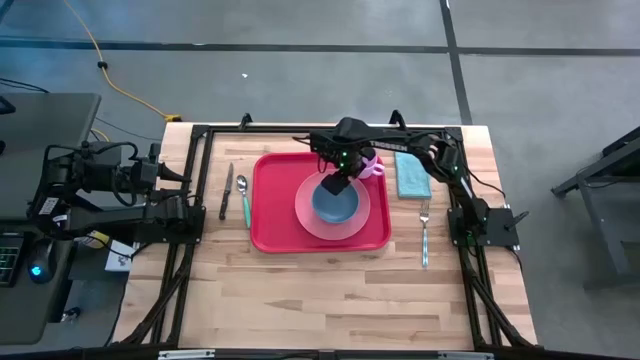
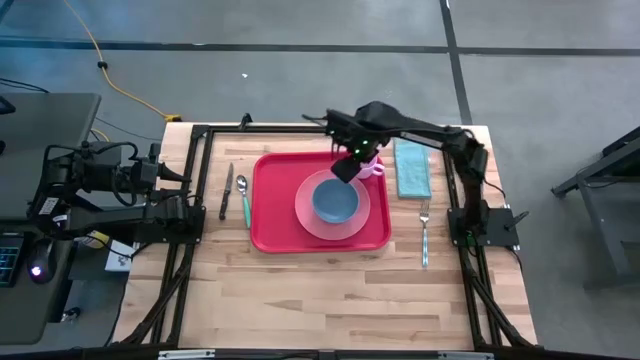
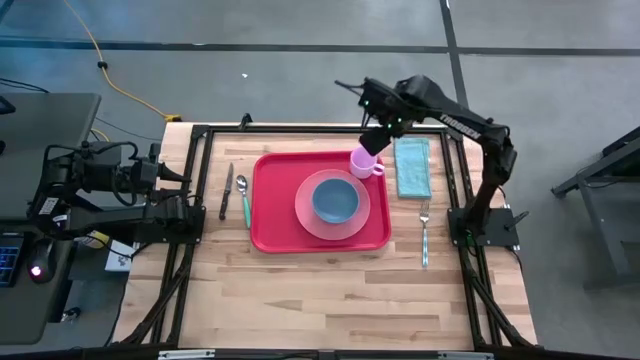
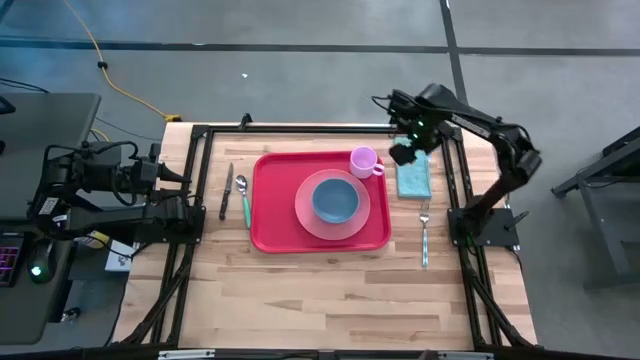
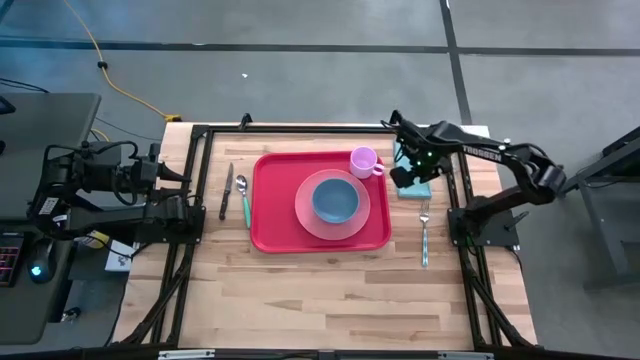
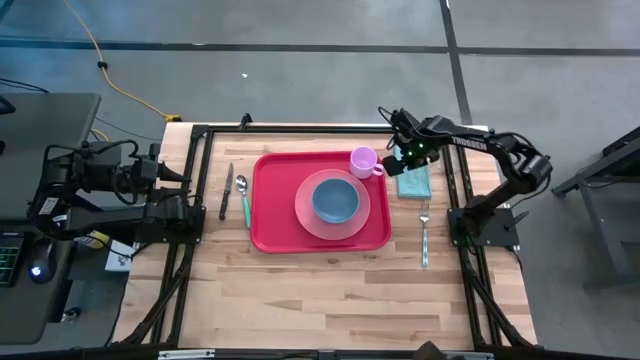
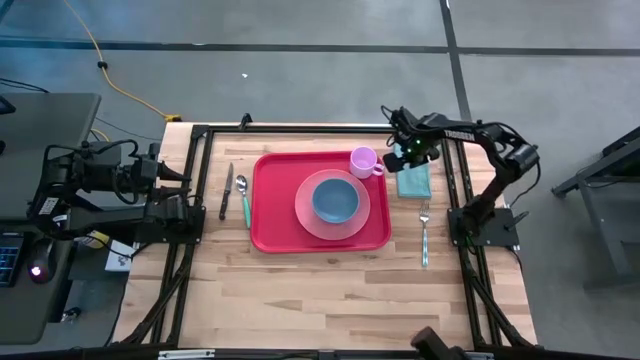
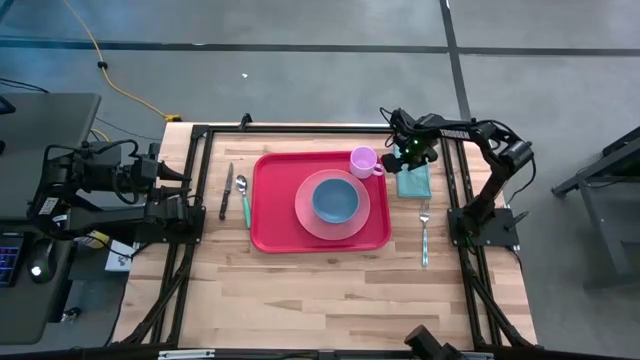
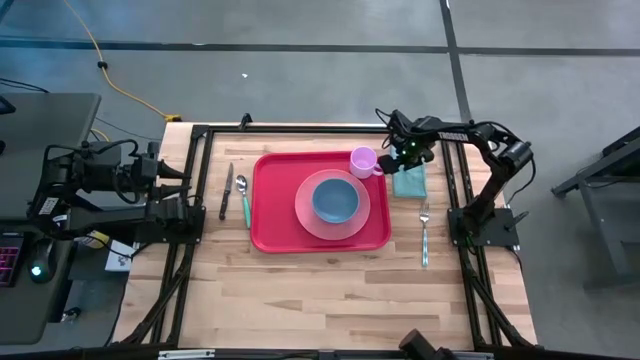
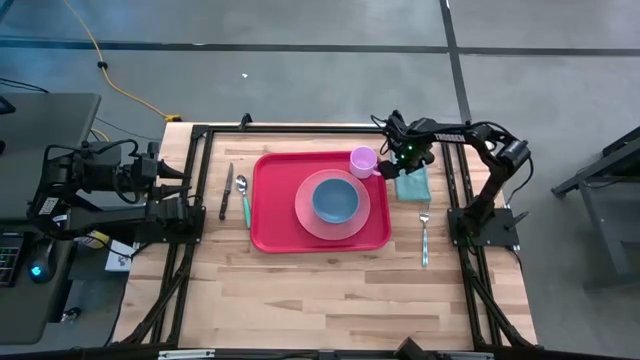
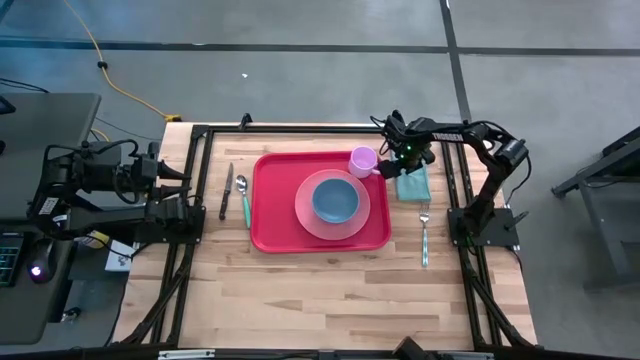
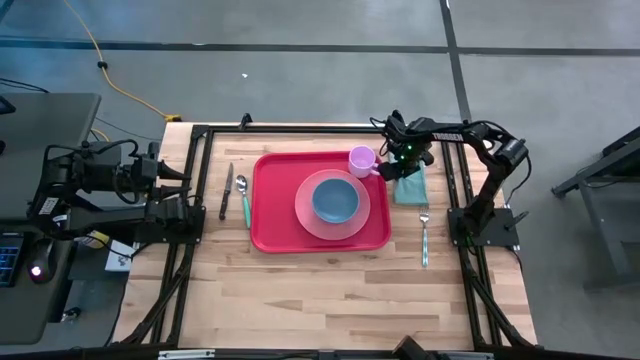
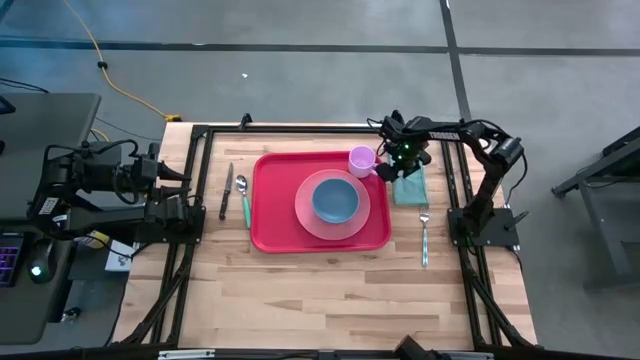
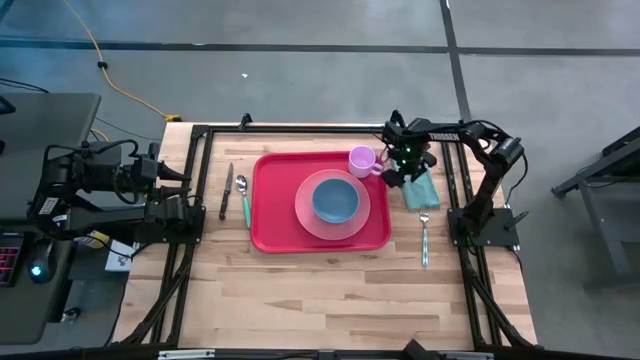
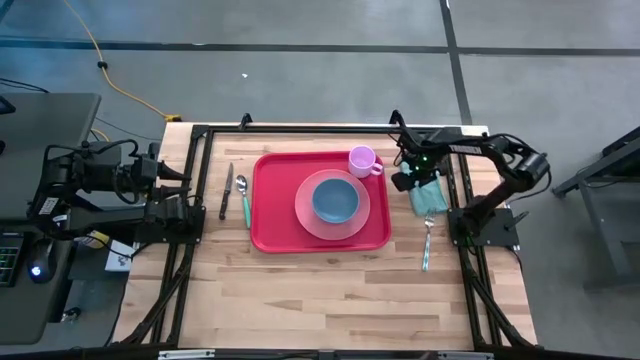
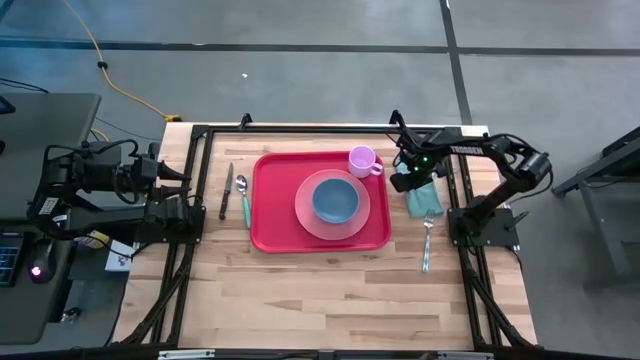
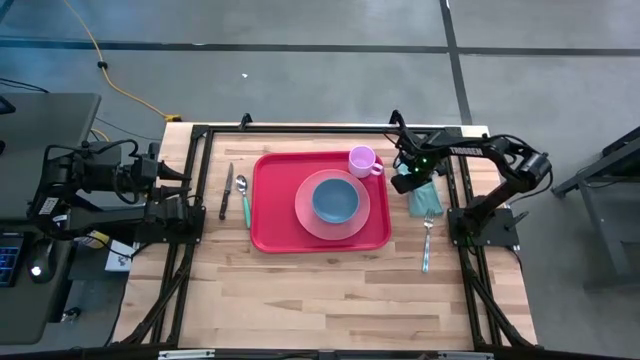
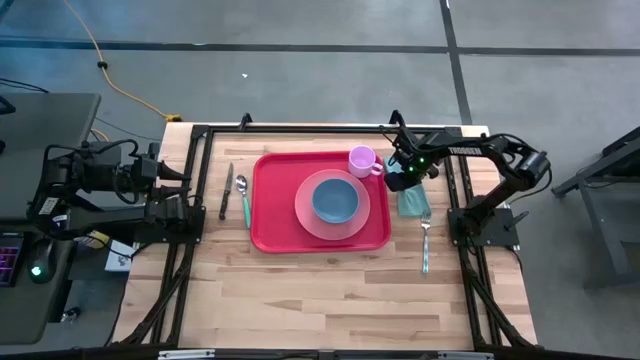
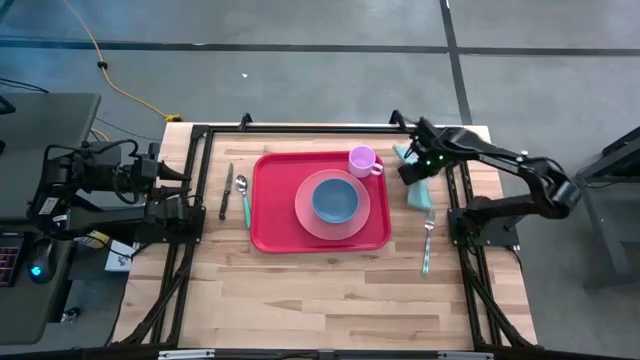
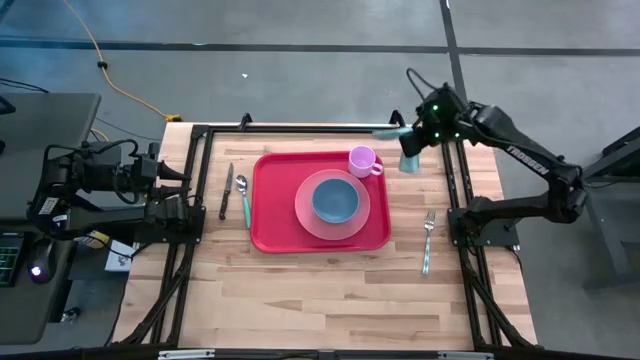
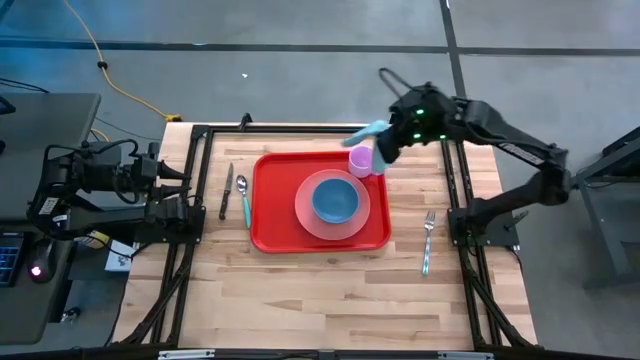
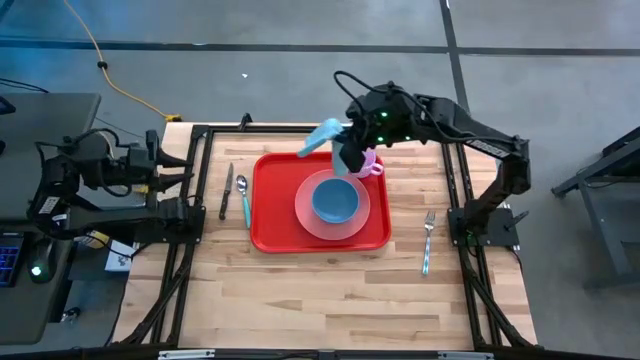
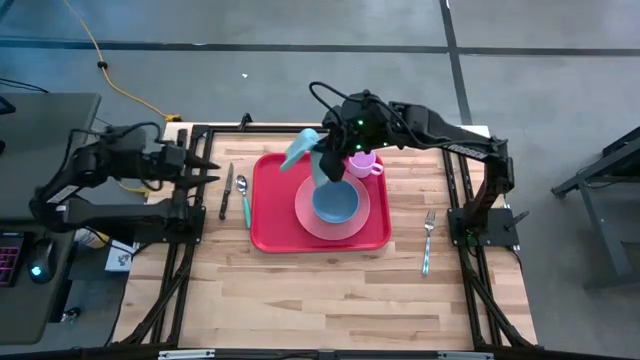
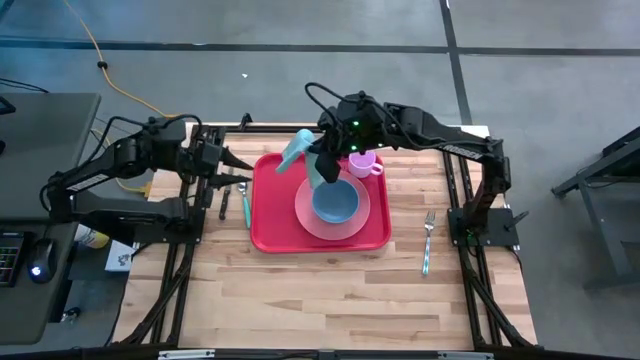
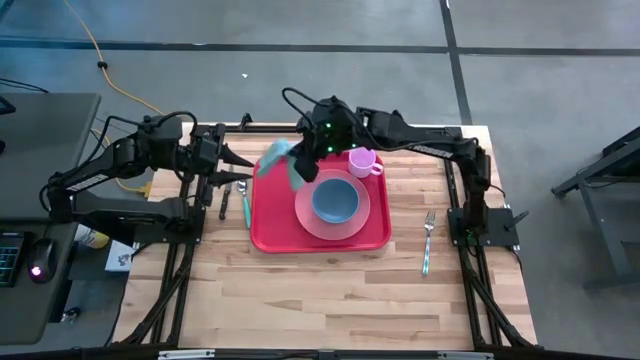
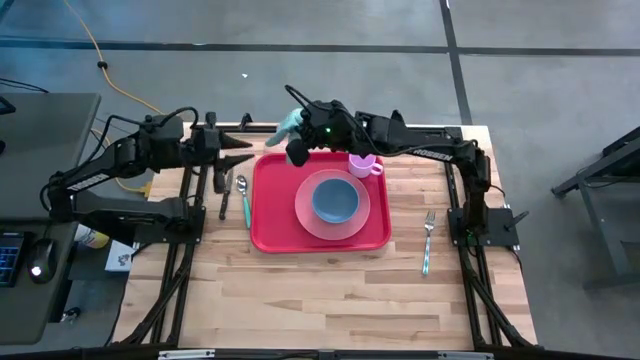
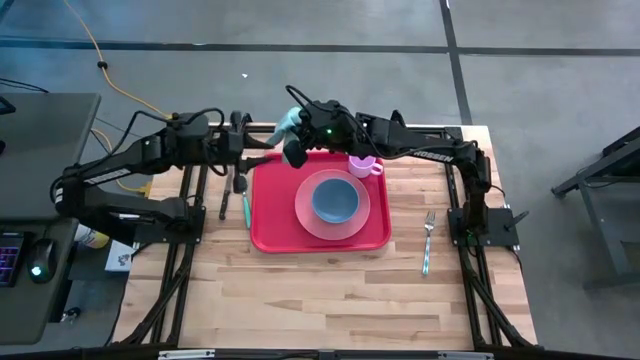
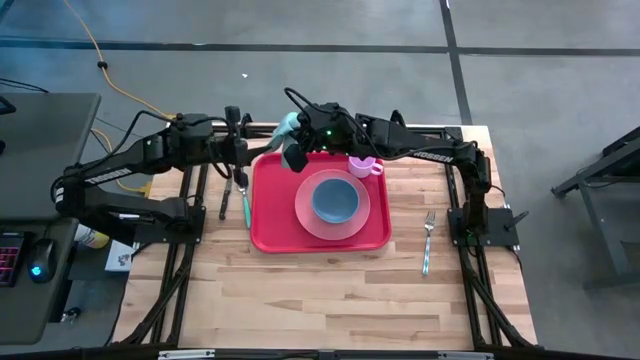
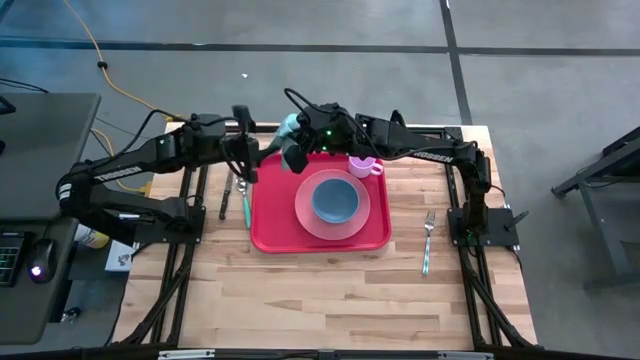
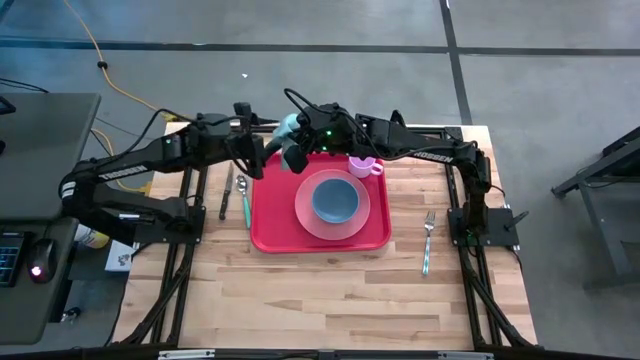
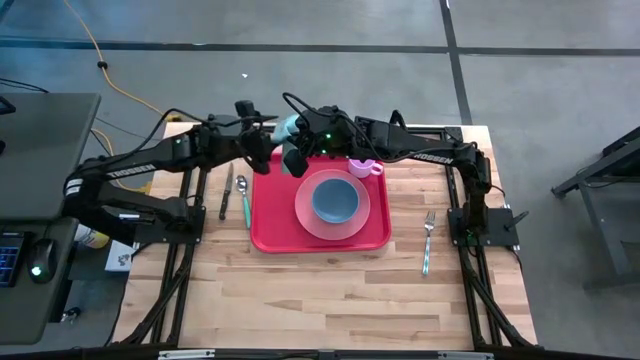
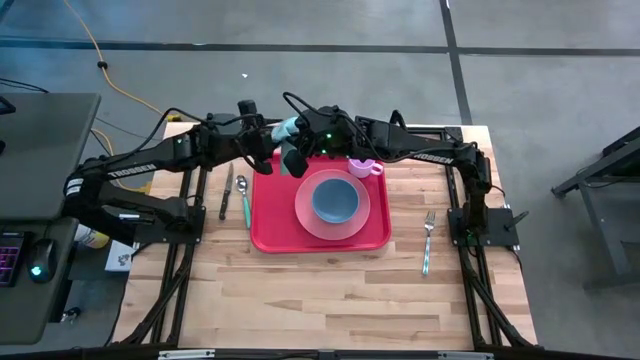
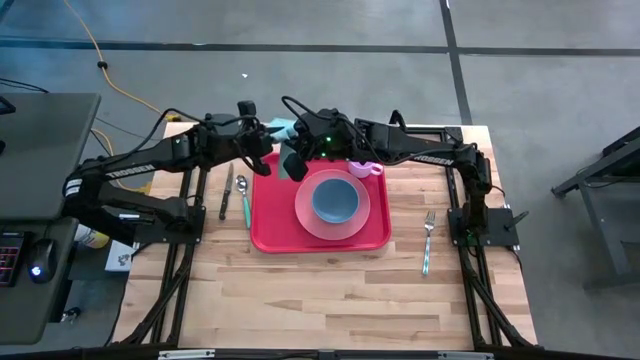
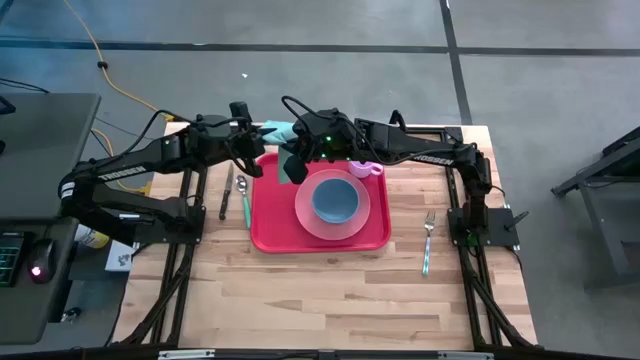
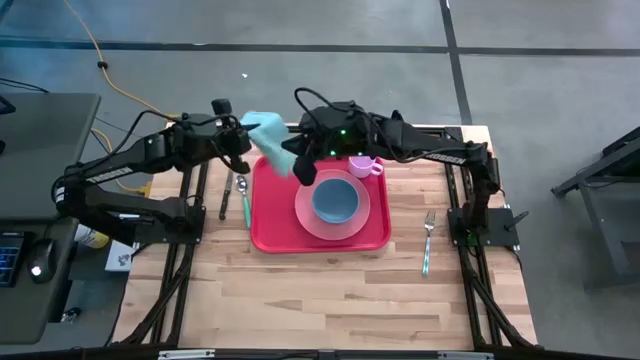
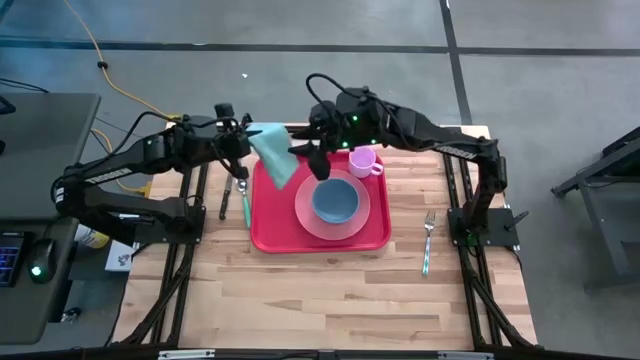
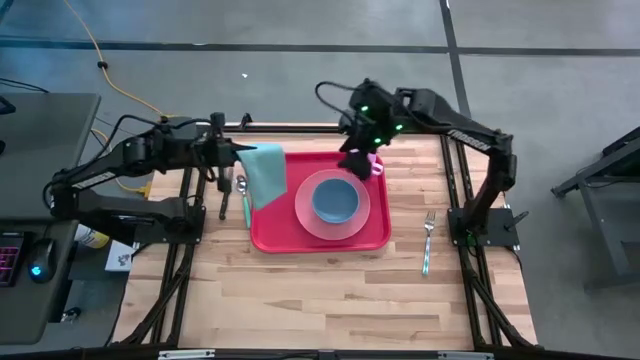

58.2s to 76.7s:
Task: Set up tray
Put the blue towel on the tray

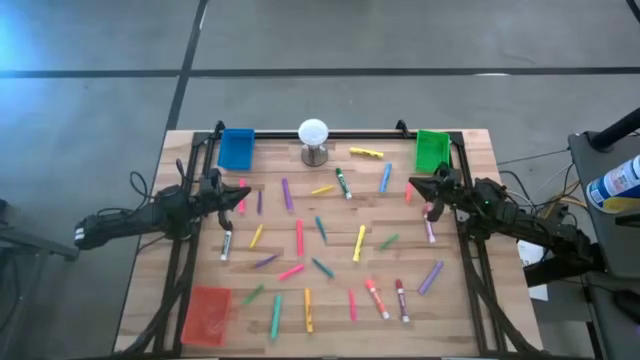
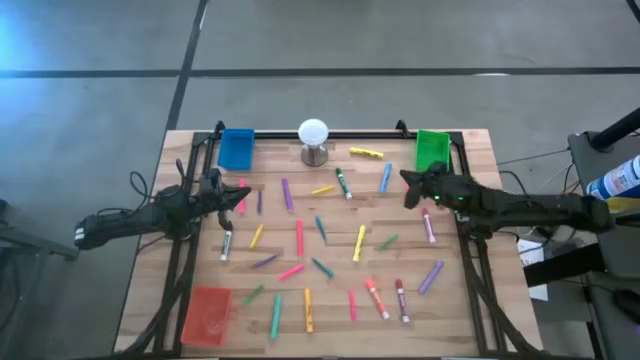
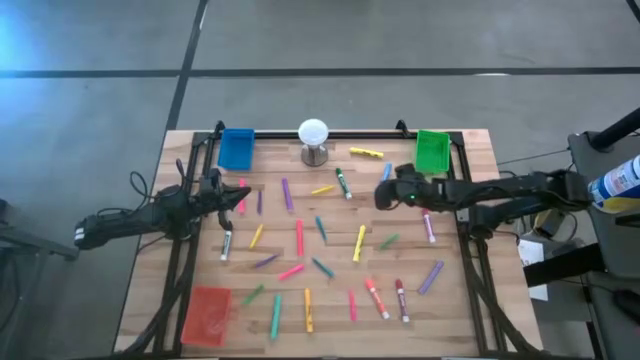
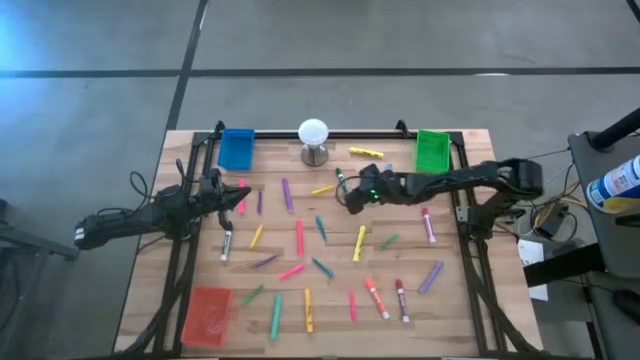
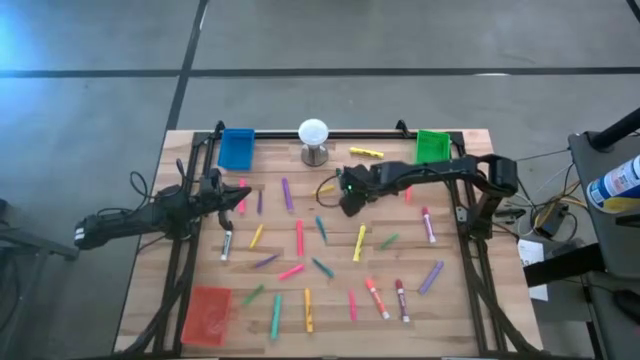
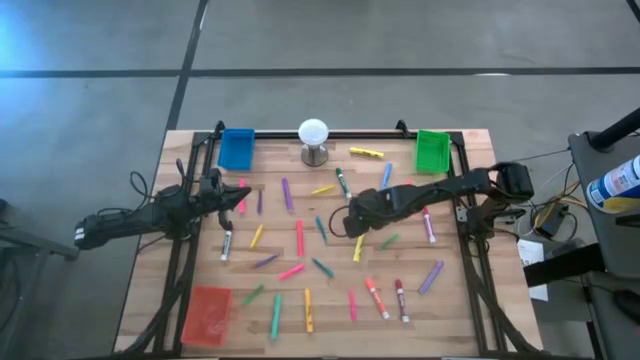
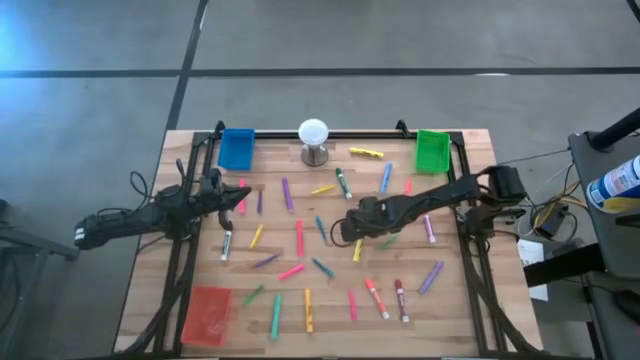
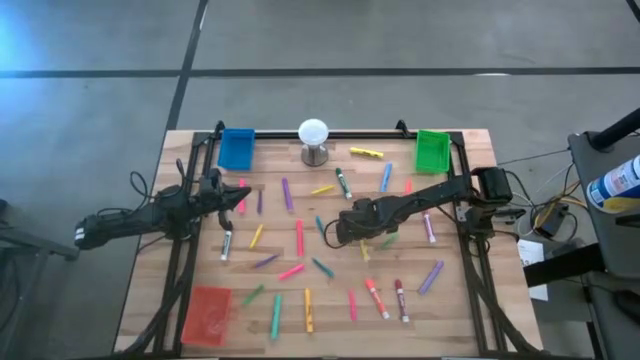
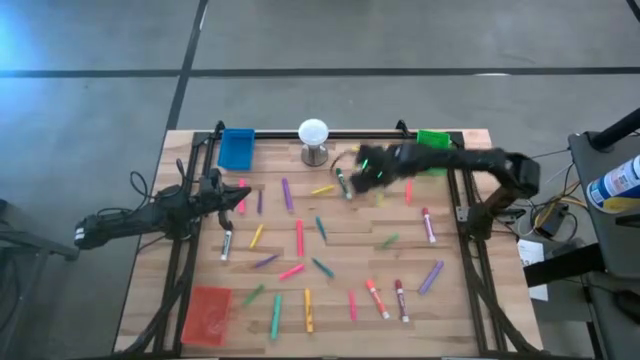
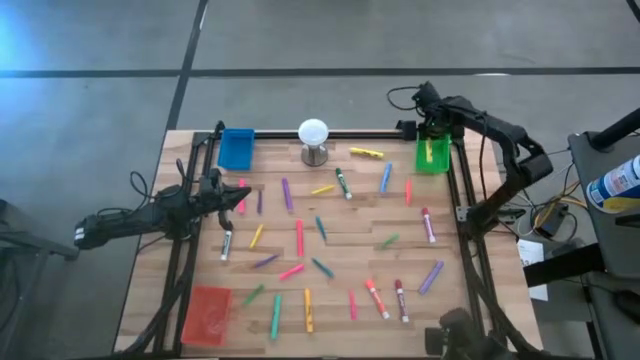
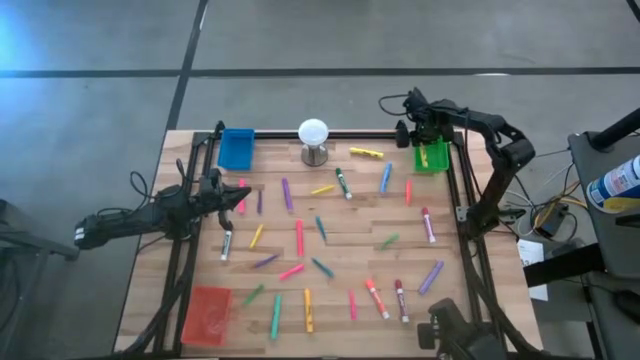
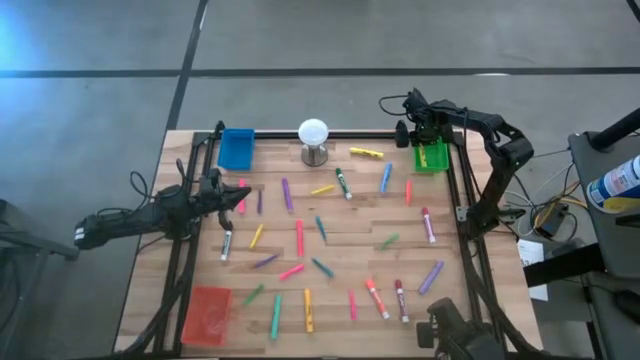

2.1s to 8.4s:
Task: Pick & Place Markers
Put the bottom yellow highlighter pen into the green bin
